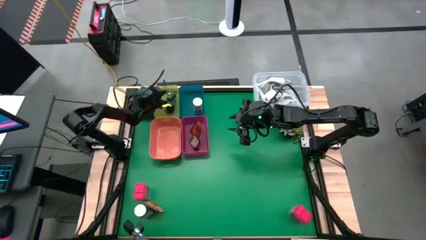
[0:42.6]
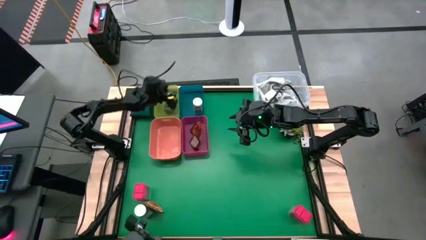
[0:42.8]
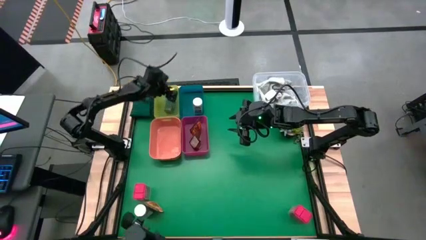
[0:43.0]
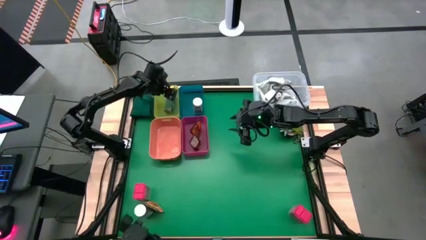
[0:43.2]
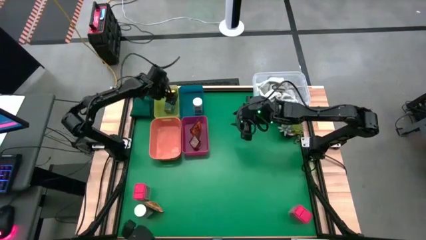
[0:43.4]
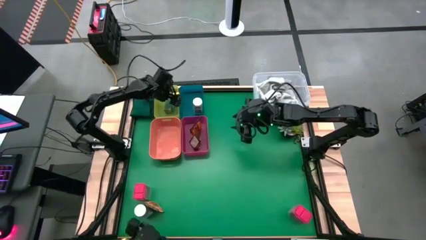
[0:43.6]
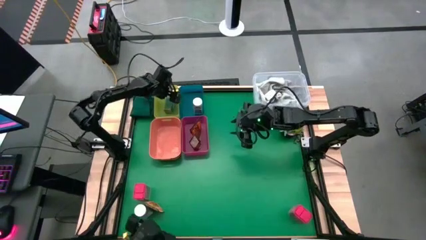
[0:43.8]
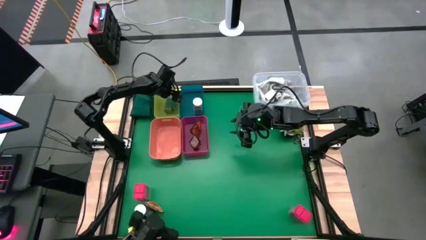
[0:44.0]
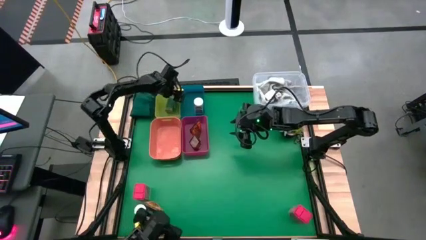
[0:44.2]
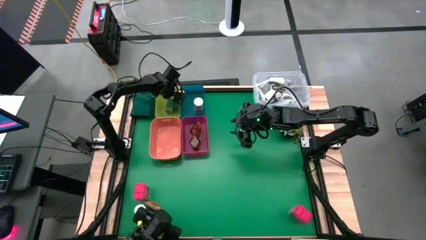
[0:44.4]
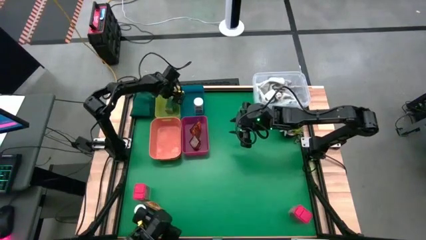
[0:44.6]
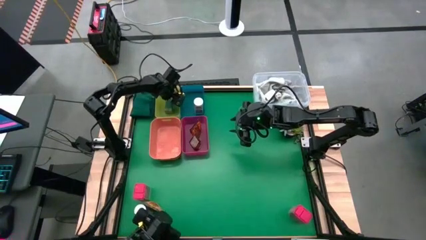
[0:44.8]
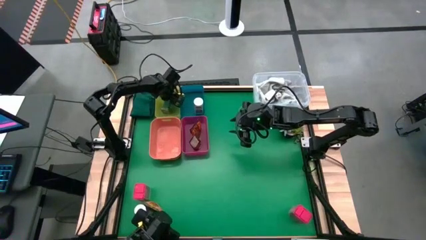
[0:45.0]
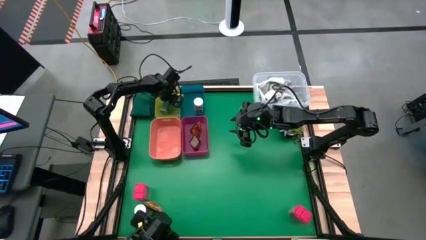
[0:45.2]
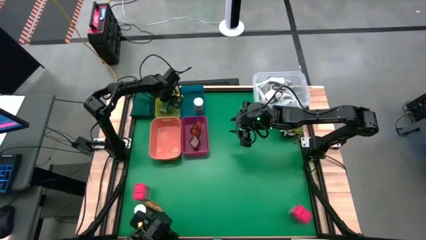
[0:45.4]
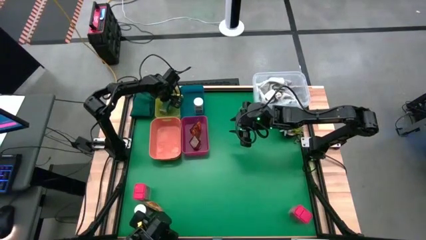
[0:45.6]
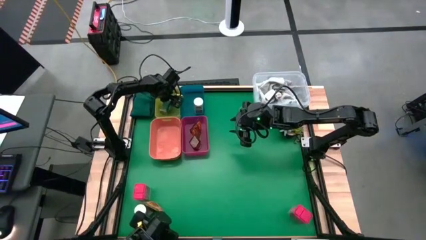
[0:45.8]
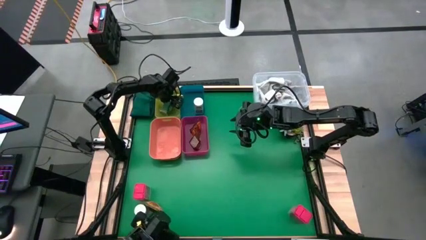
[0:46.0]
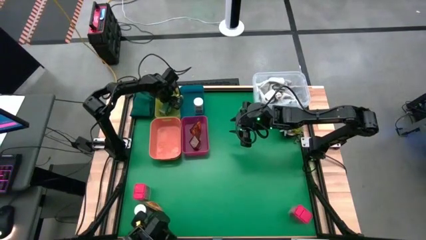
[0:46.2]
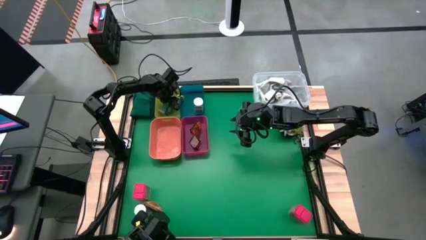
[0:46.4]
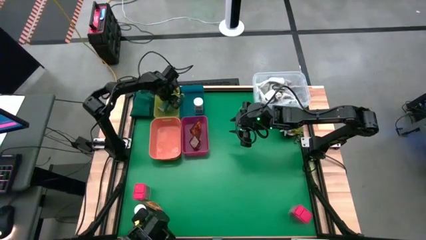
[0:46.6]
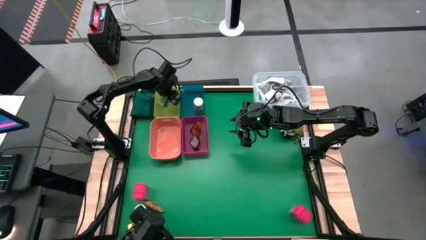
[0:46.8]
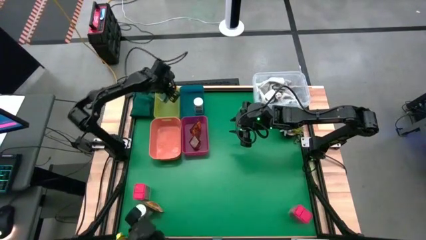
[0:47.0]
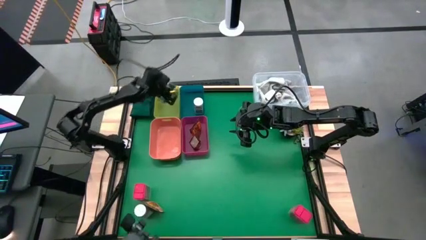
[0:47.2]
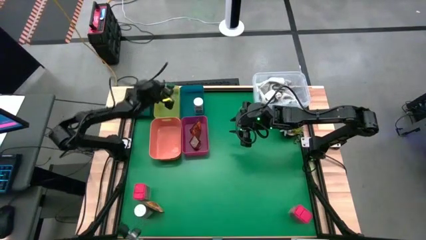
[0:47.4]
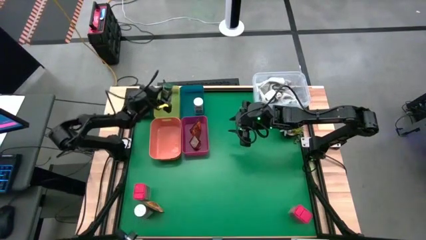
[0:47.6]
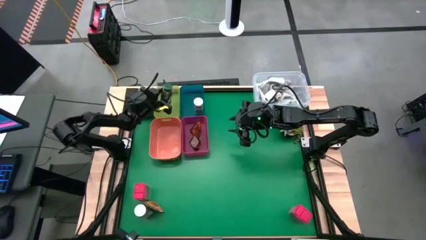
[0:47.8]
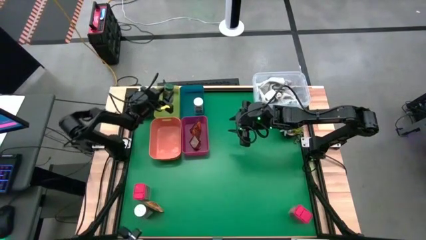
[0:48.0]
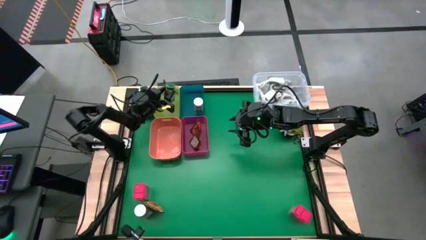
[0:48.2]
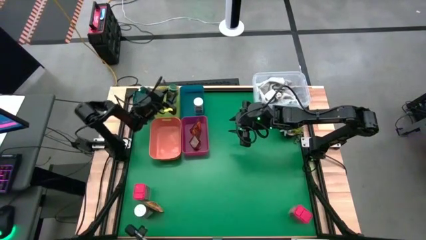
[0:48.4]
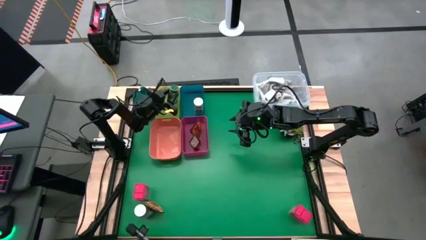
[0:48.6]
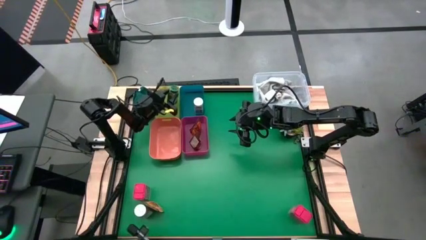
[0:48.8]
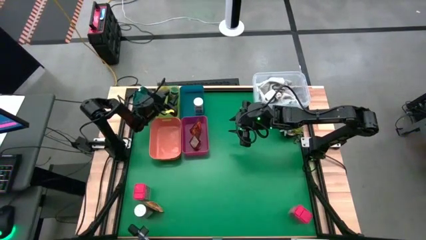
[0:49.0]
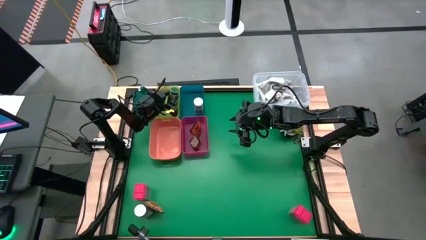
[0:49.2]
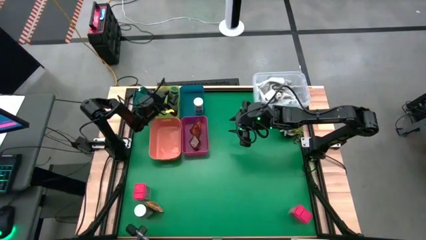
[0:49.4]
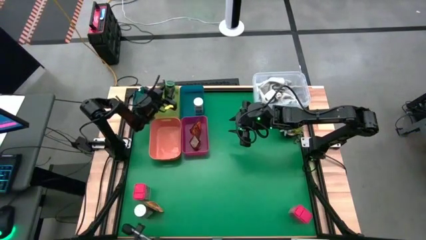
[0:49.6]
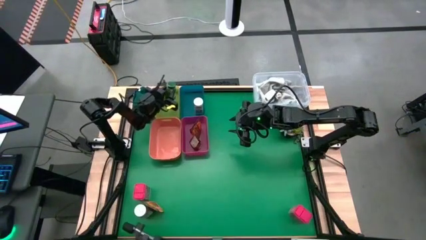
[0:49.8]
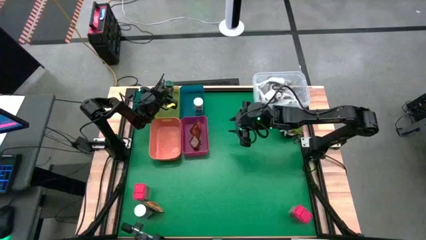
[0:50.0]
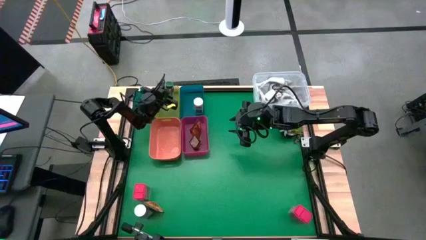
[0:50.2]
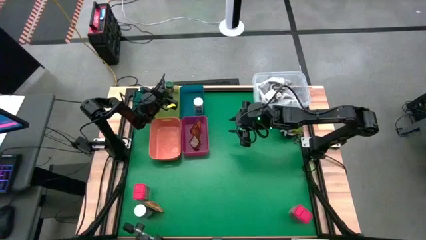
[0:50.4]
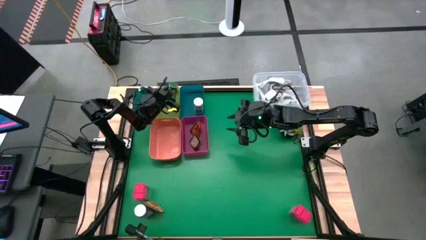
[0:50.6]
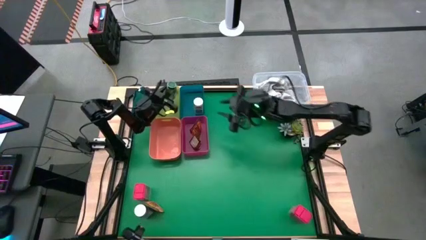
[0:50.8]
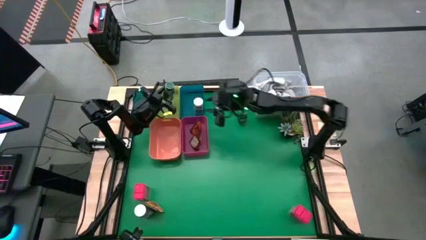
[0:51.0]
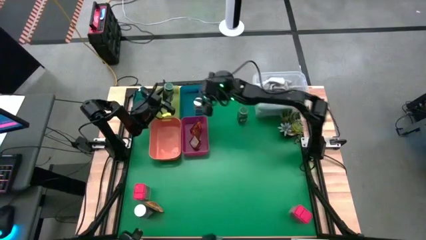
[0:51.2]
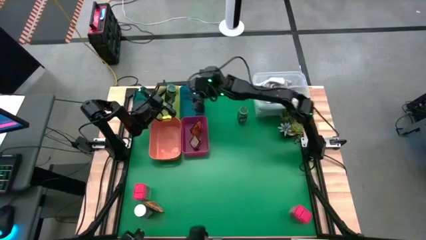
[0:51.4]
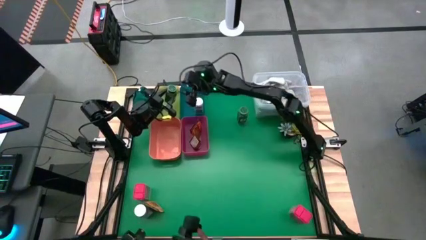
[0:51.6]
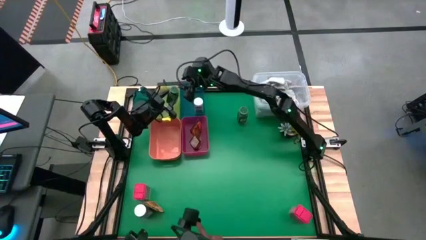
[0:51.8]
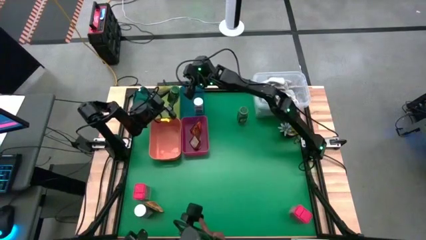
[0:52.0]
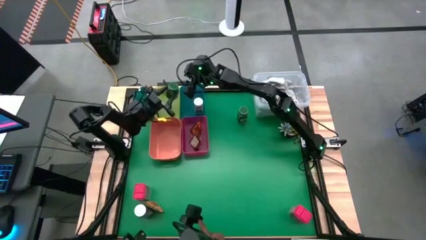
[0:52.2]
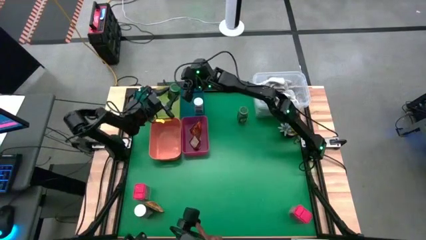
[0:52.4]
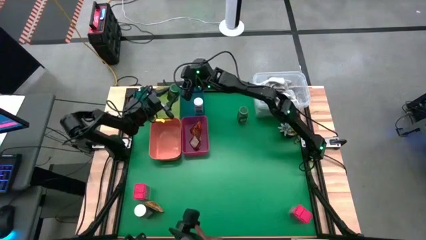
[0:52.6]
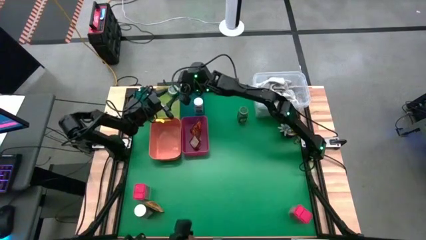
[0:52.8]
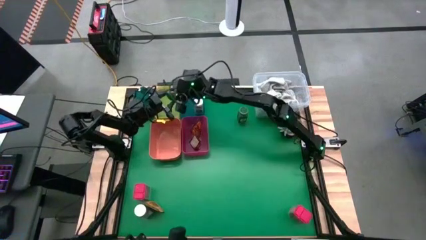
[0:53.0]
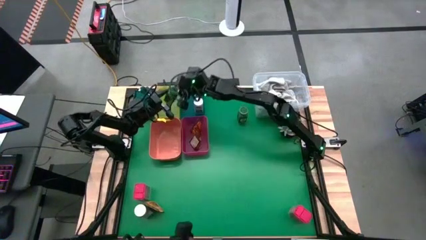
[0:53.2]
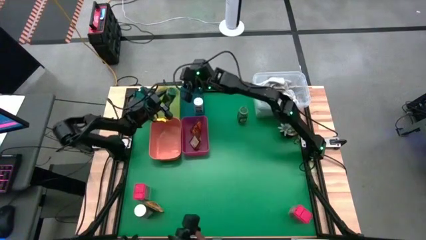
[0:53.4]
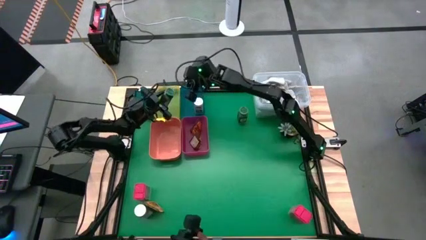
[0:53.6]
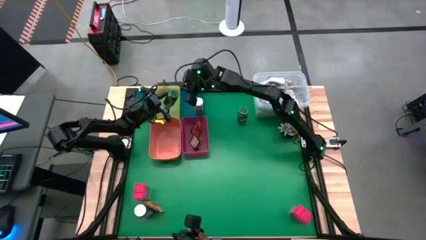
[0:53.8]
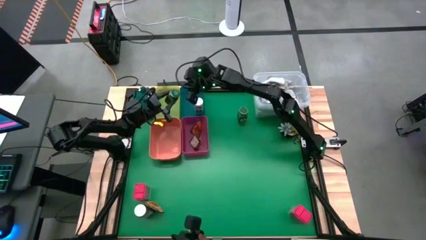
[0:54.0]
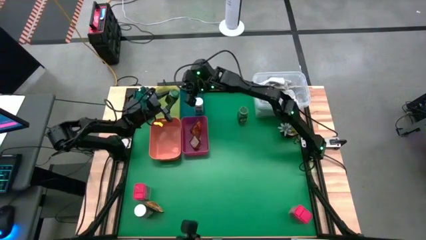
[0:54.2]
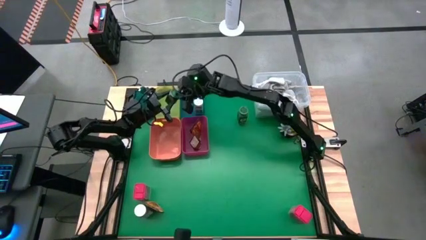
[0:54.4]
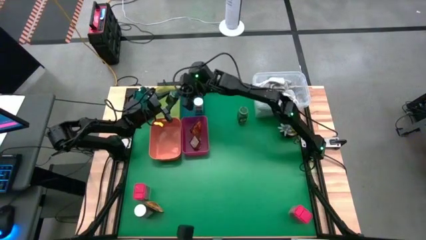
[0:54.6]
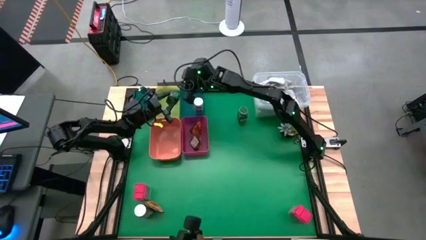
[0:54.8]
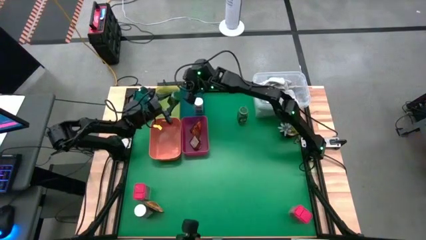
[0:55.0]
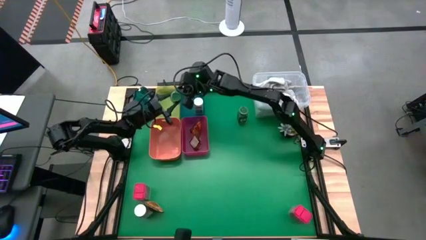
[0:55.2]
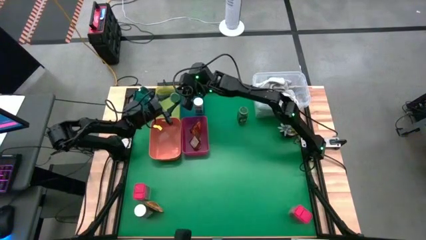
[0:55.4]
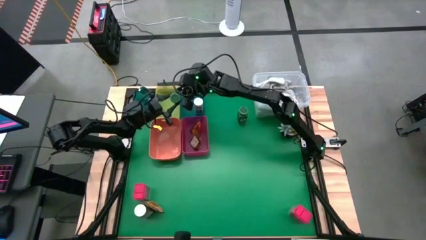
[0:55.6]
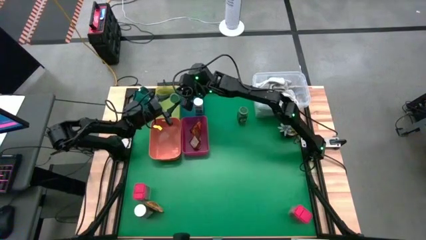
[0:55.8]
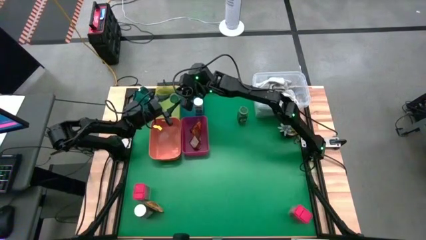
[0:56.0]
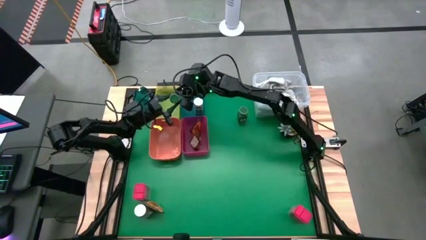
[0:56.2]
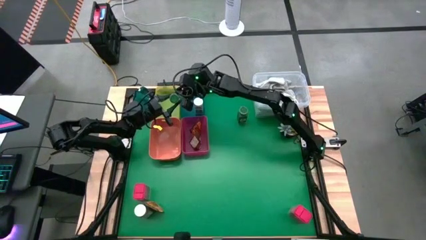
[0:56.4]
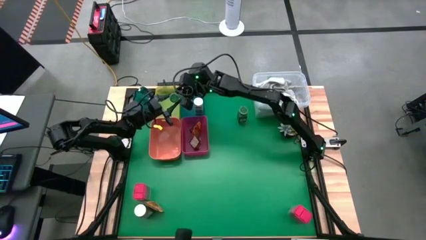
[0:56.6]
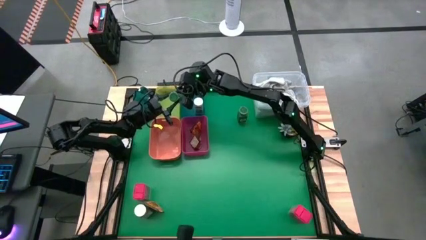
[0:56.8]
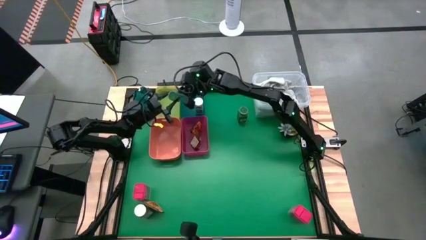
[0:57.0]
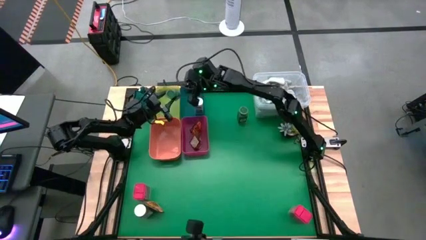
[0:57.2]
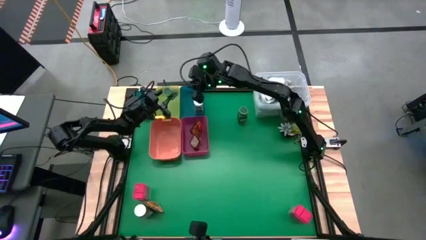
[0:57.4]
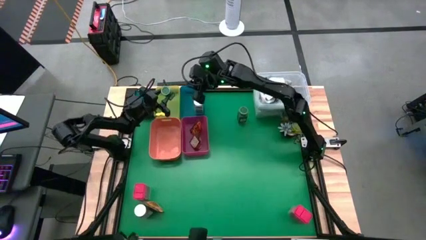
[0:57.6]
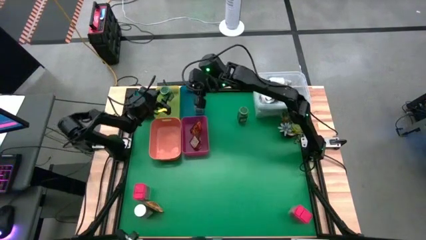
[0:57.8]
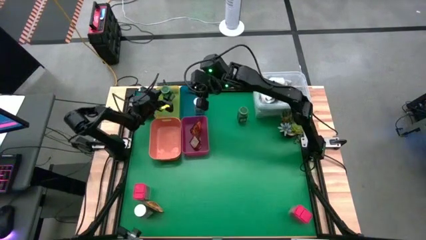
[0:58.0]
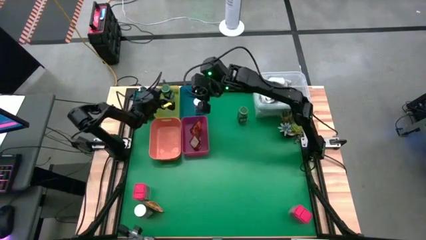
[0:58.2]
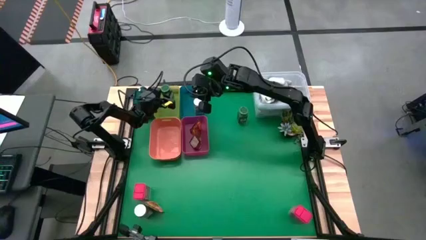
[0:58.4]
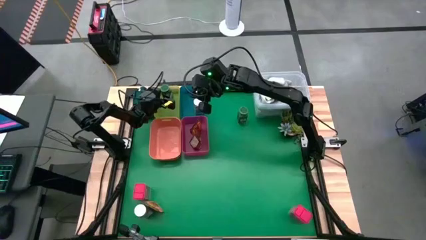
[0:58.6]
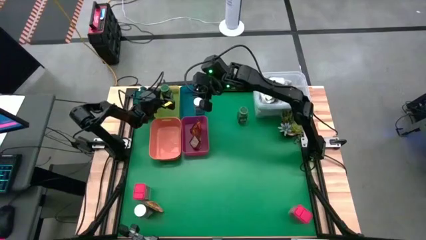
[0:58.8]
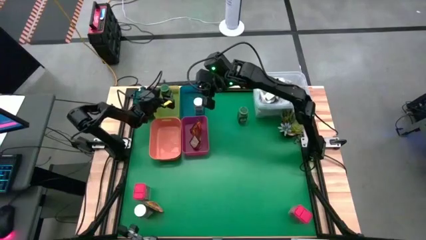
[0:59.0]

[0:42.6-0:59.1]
Task: Sort spices by type
Put the left green seasoning bottle into the yellow bin
